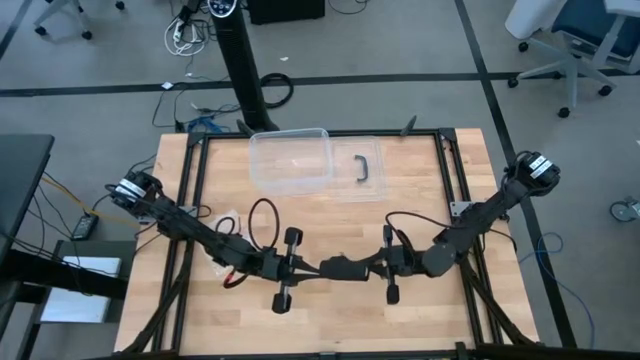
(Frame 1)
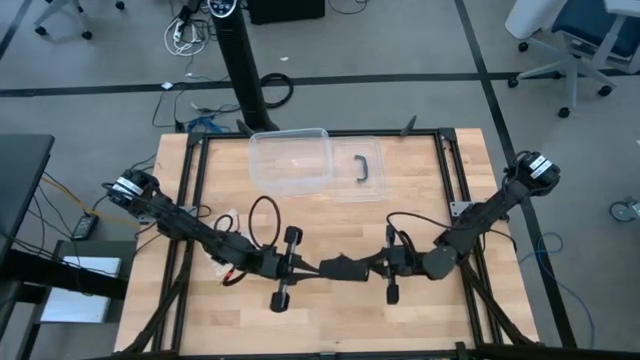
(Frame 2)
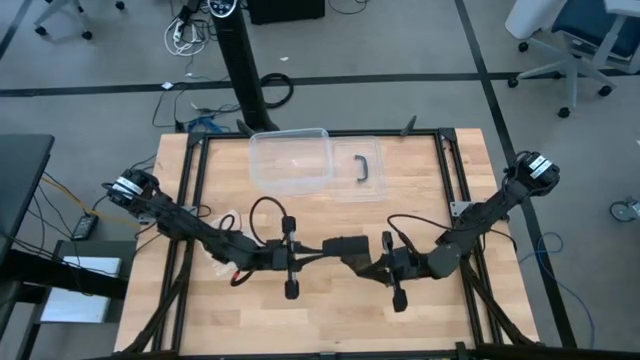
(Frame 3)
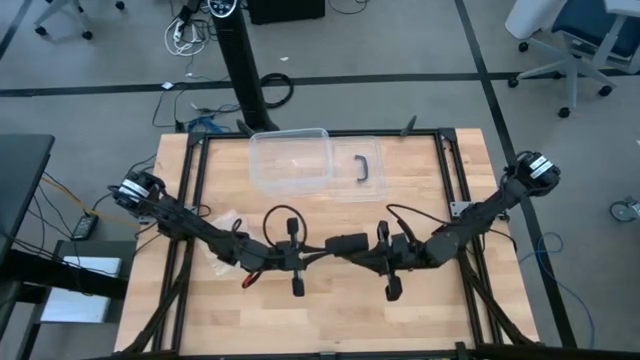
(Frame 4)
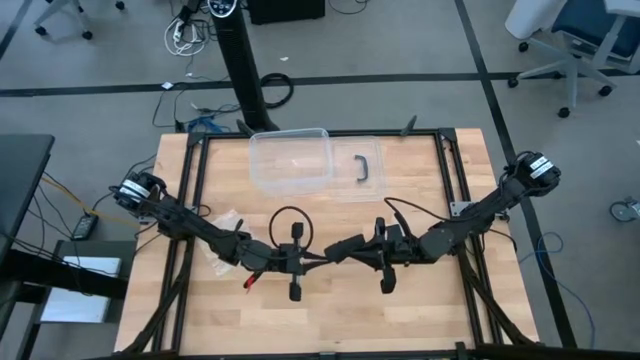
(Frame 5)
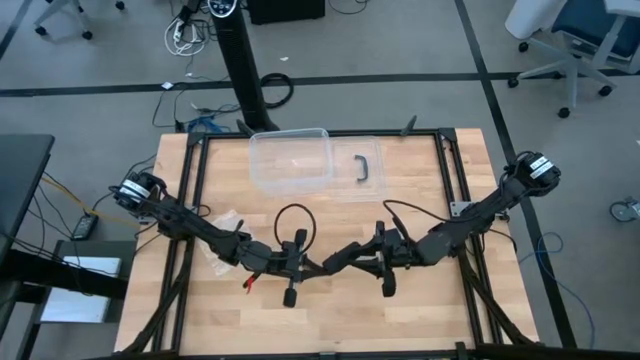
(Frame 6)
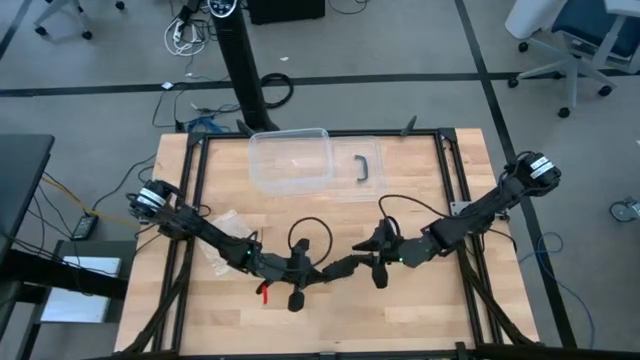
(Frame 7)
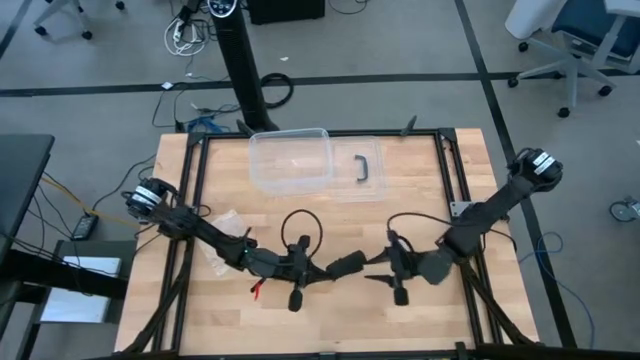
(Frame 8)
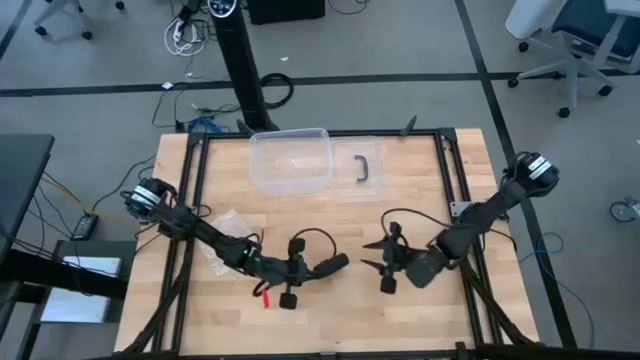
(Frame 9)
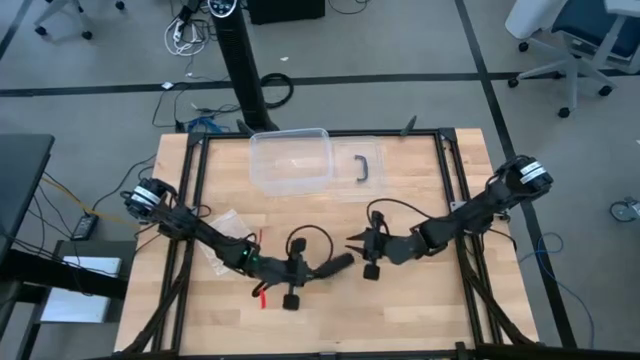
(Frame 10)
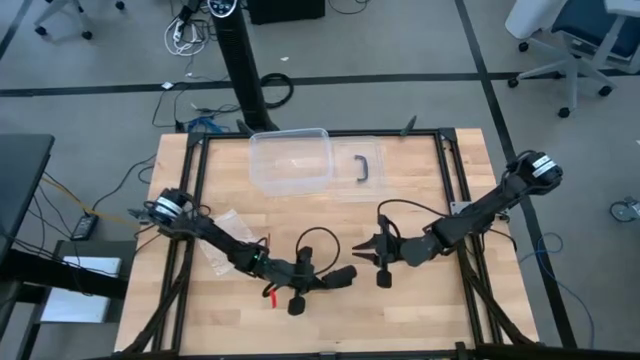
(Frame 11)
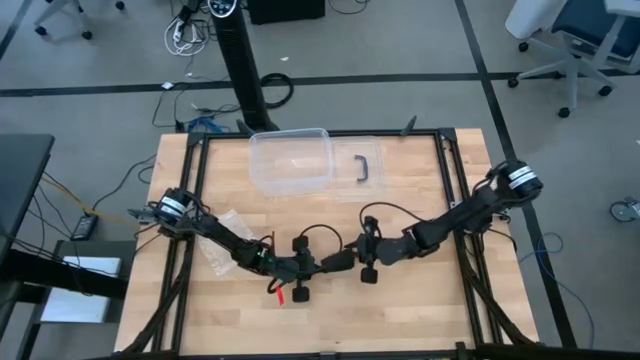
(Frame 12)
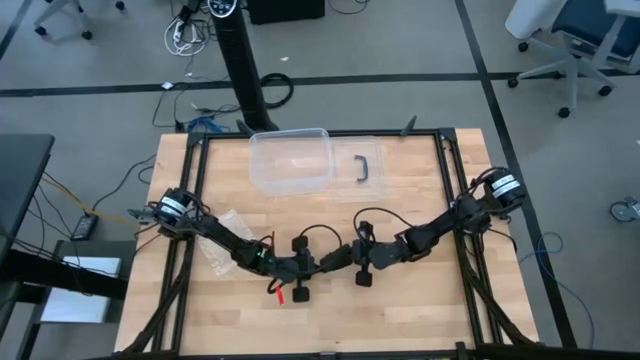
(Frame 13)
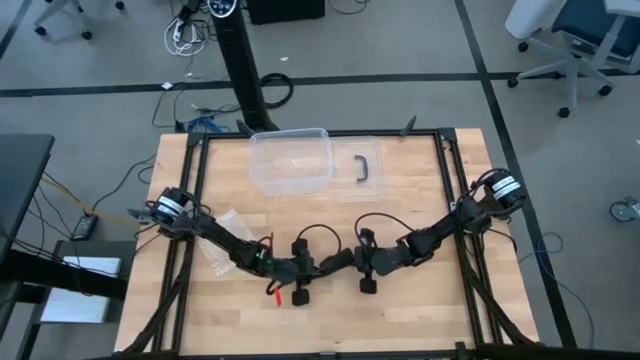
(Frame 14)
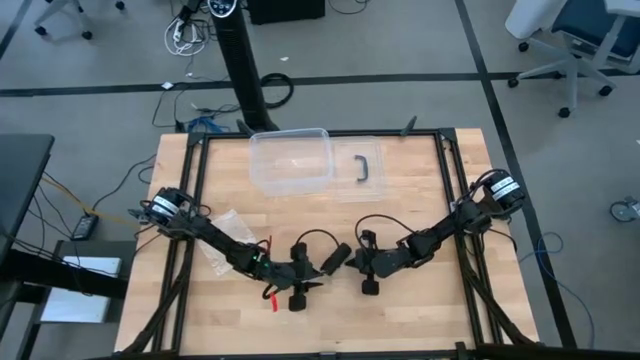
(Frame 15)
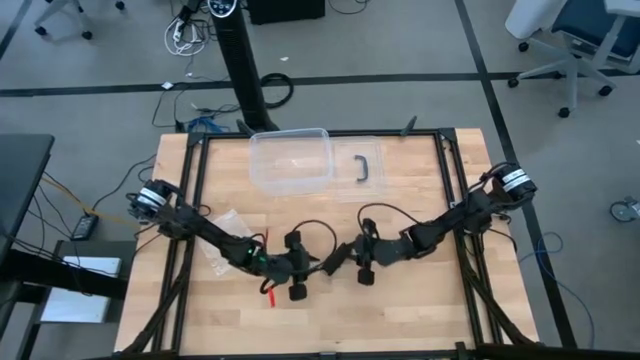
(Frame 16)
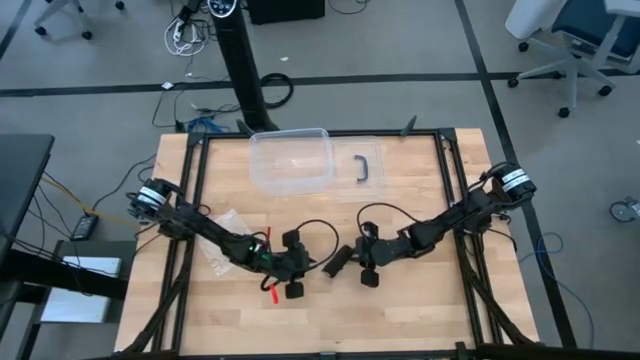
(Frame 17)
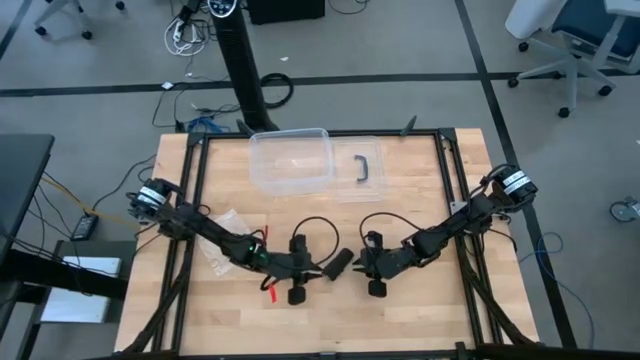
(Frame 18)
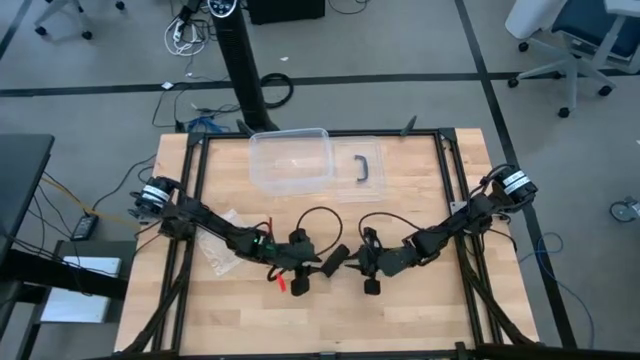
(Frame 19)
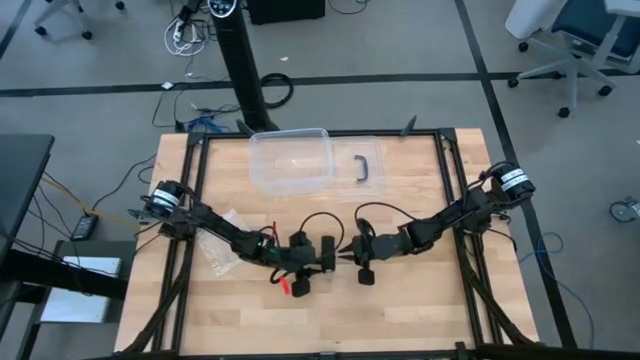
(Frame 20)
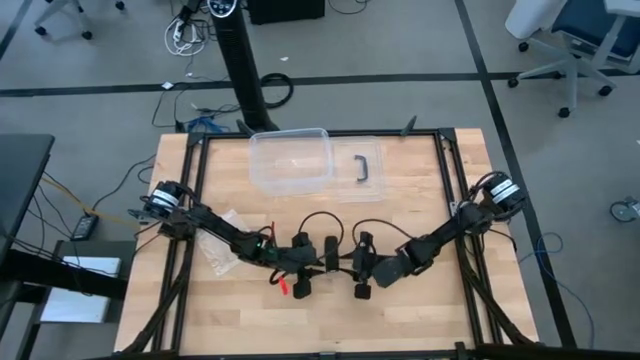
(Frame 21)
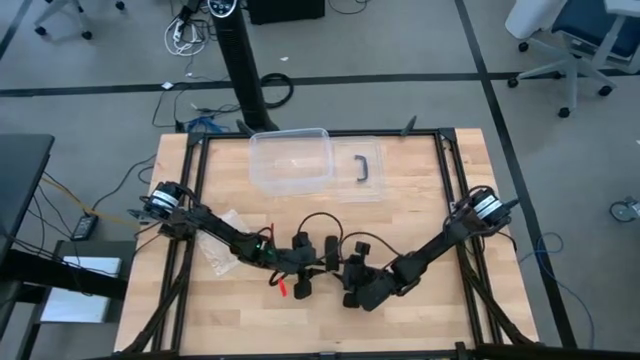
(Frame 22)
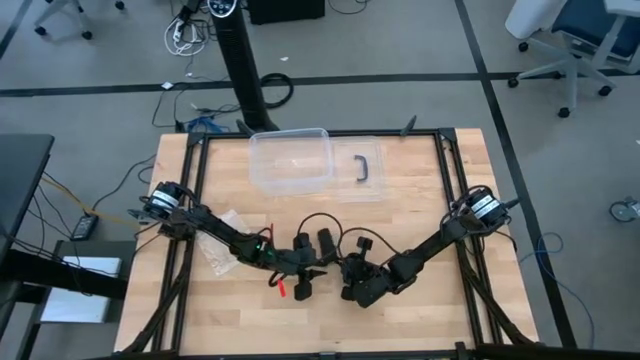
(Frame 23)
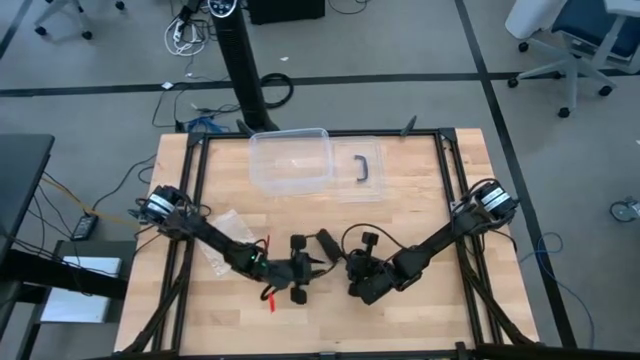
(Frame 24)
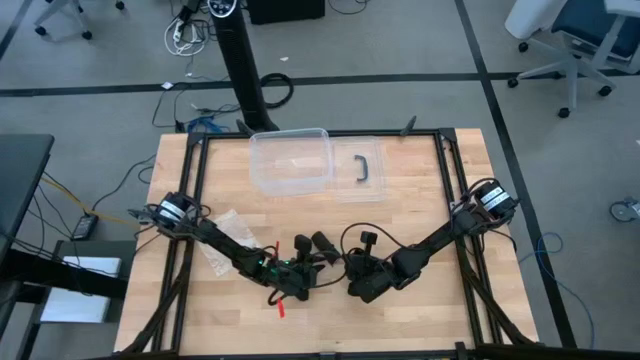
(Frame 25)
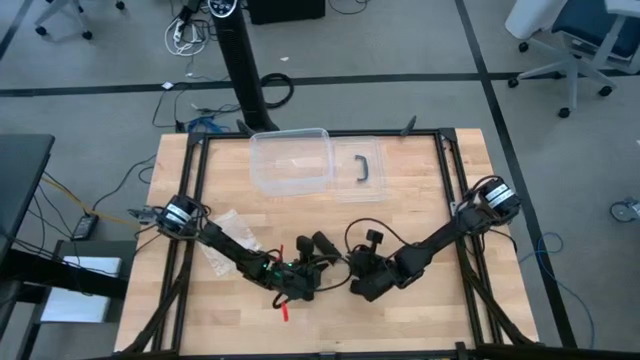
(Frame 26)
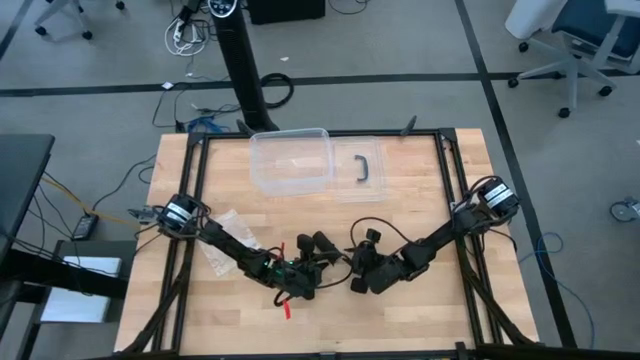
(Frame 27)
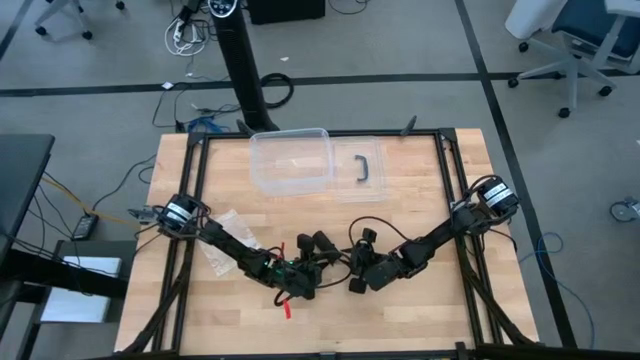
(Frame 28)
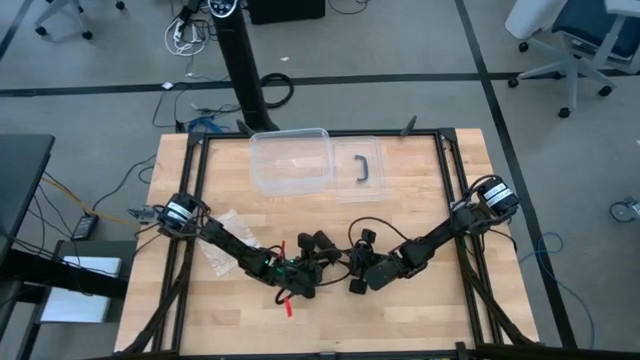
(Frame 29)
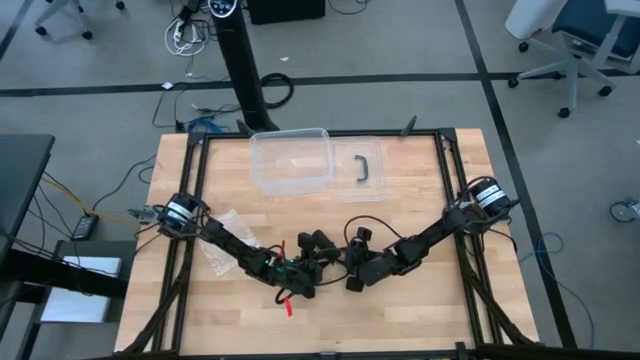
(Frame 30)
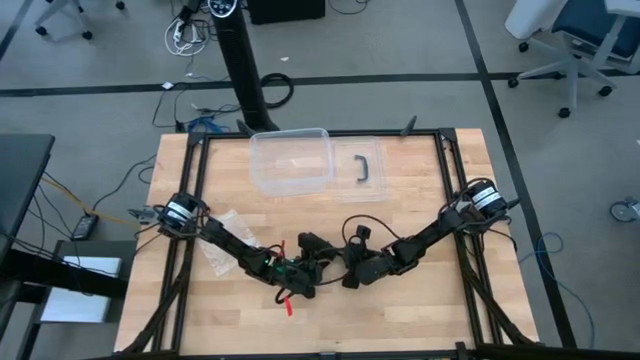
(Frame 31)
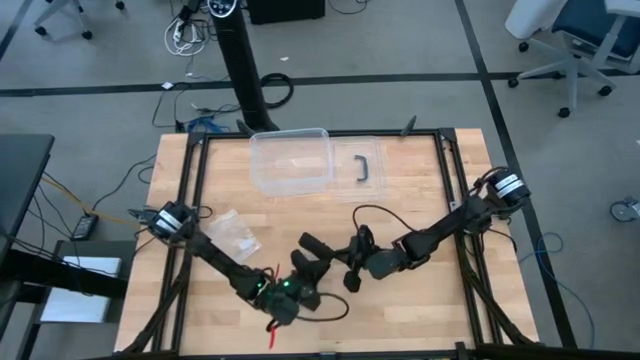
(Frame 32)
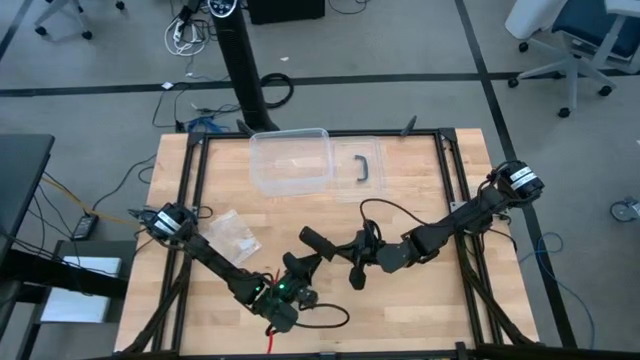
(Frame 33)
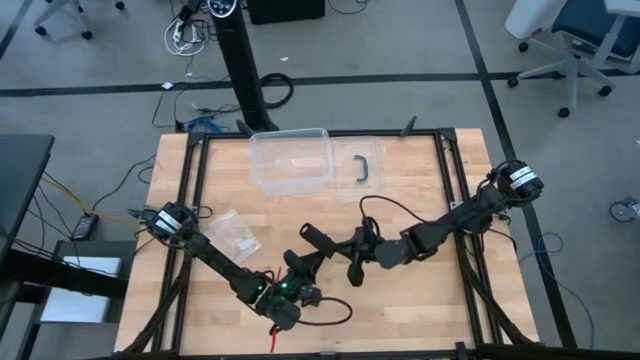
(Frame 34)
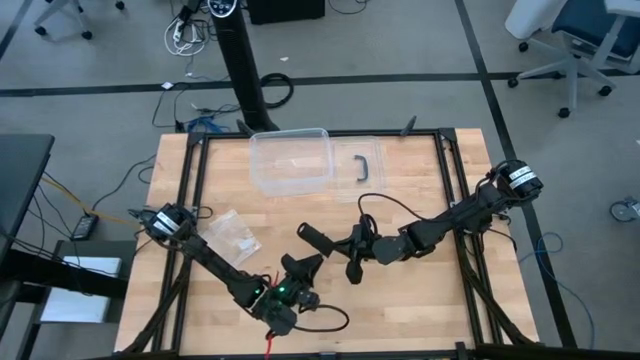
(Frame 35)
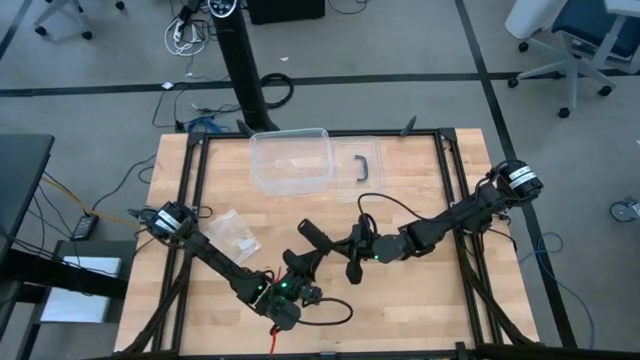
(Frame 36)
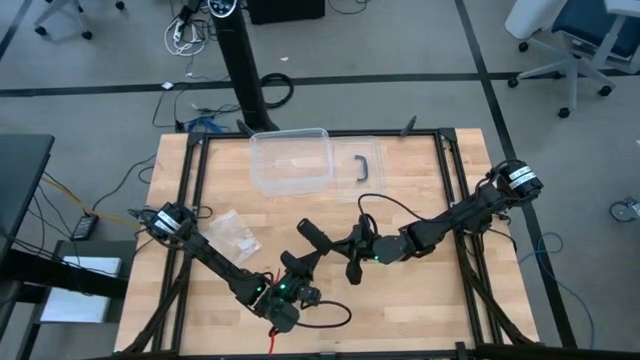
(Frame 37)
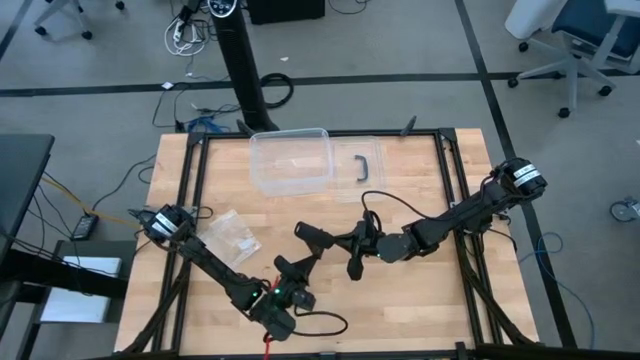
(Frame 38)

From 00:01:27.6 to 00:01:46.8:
Task: Roll bandage
Roll the black bandage

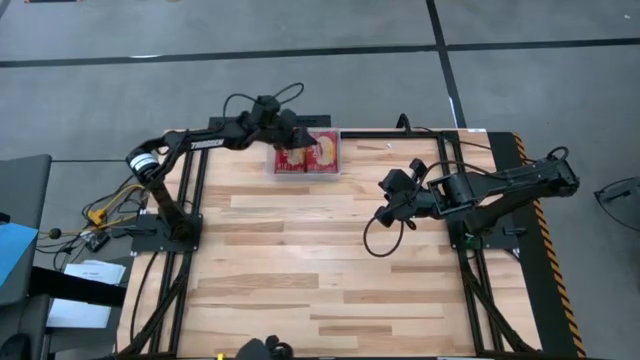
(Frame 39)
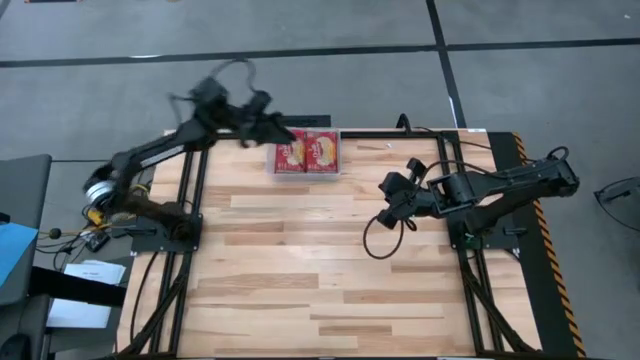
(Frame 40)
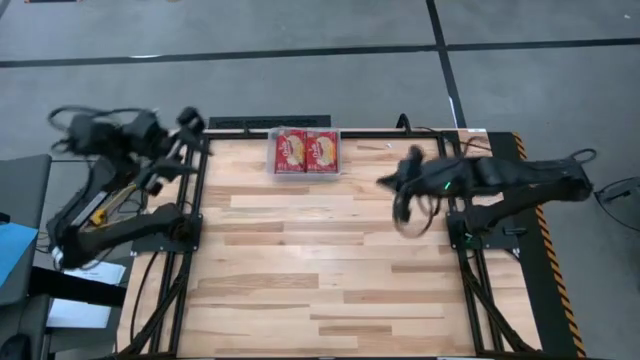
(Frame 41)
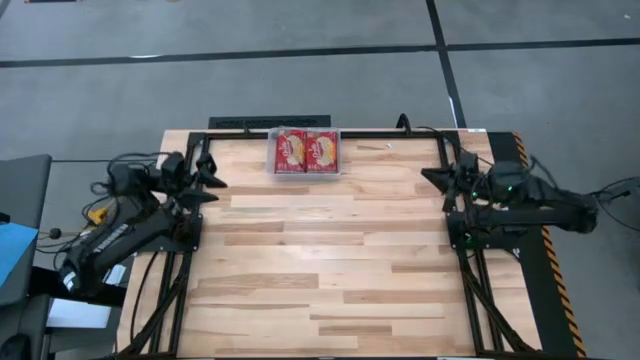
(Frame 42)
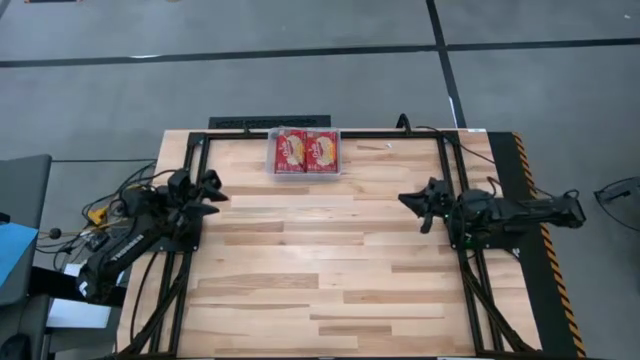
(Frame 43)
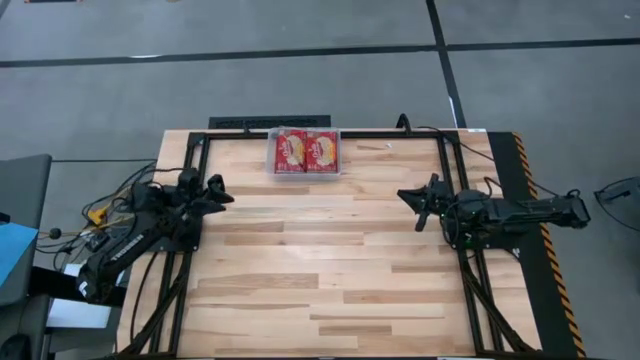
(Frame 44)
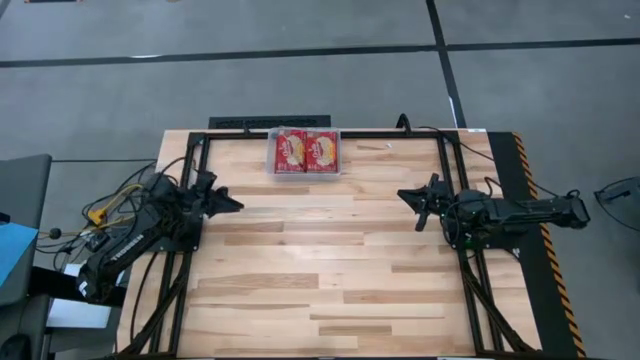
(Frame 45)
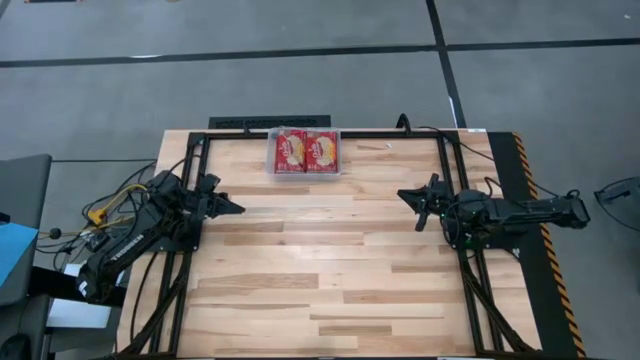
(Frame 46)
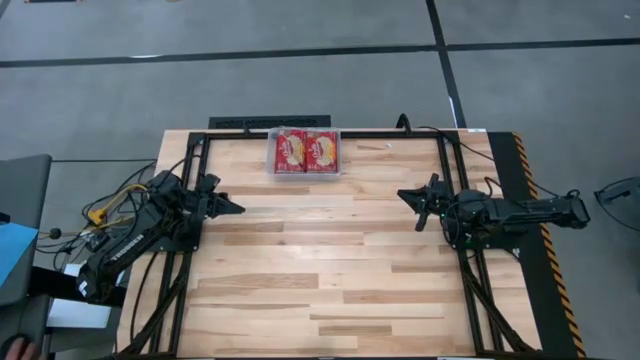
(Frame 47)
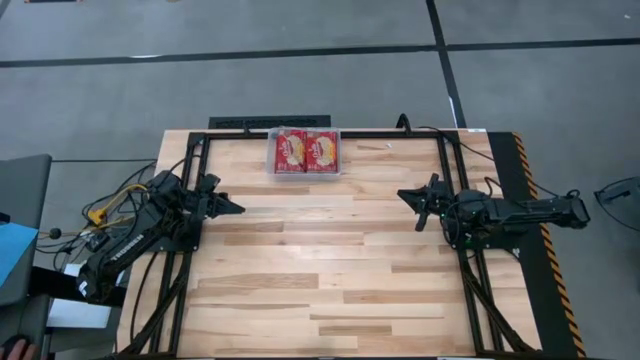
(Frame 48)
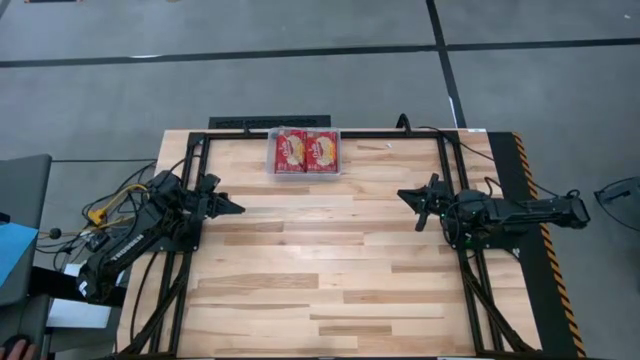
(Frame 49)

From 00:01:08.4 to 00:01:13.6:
Task: Sort popcorn bags into baskets
Return to Home Position
